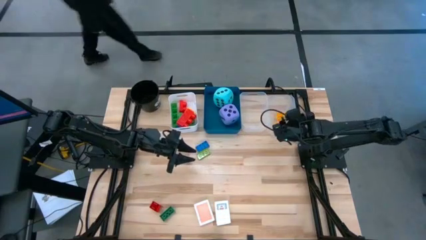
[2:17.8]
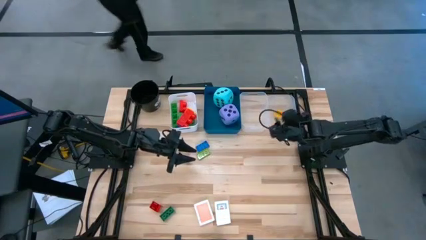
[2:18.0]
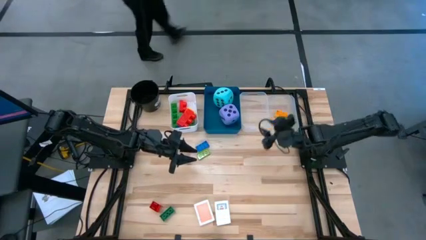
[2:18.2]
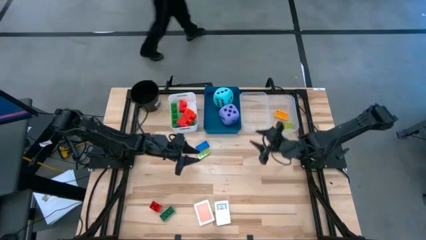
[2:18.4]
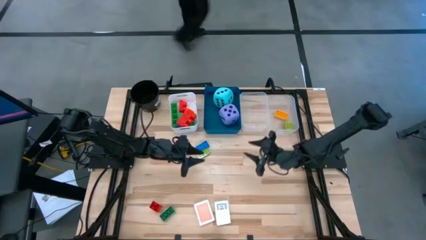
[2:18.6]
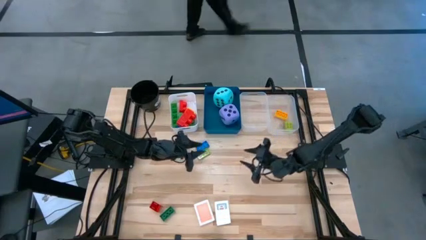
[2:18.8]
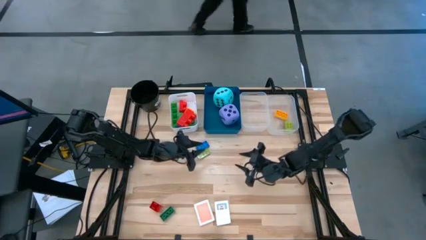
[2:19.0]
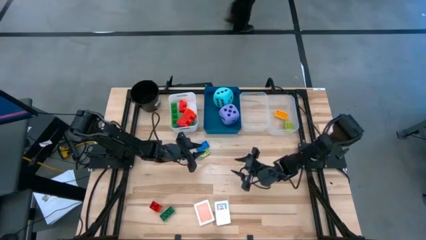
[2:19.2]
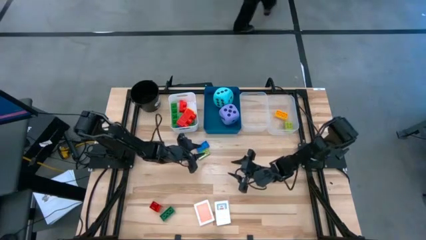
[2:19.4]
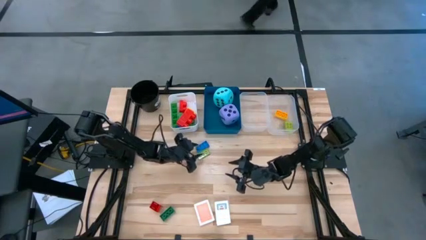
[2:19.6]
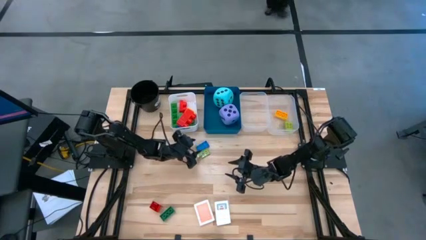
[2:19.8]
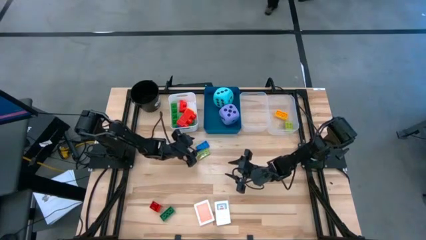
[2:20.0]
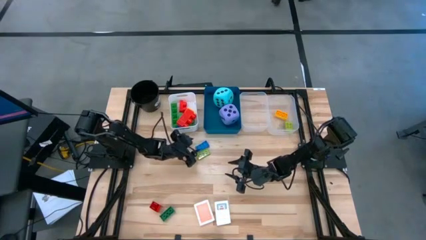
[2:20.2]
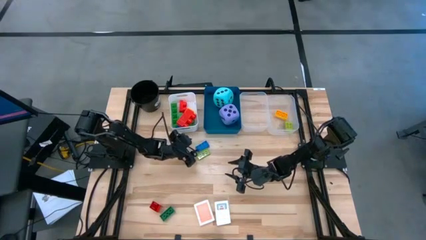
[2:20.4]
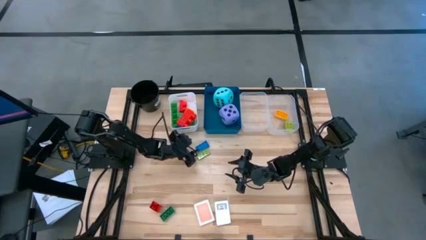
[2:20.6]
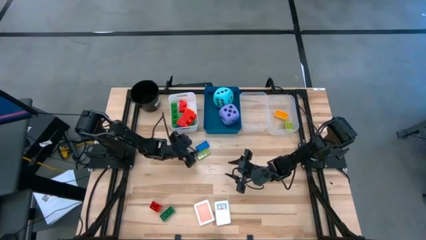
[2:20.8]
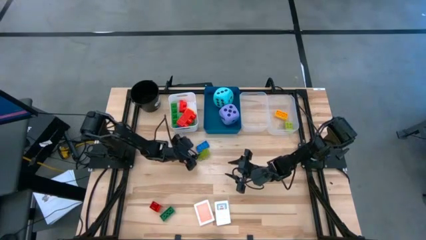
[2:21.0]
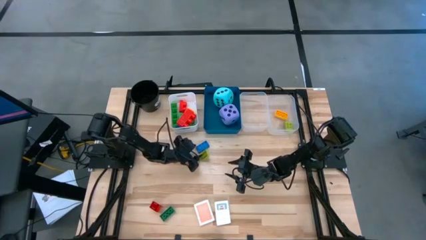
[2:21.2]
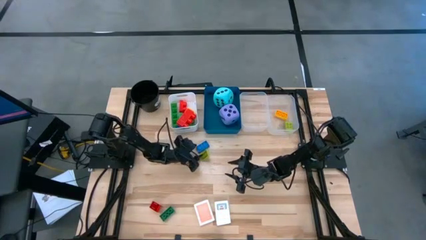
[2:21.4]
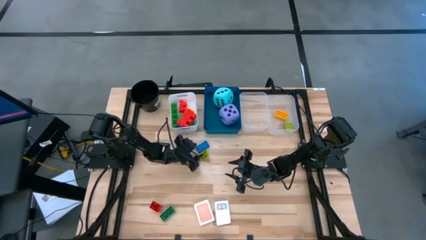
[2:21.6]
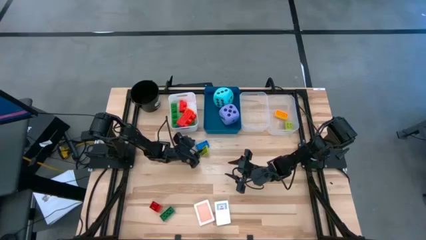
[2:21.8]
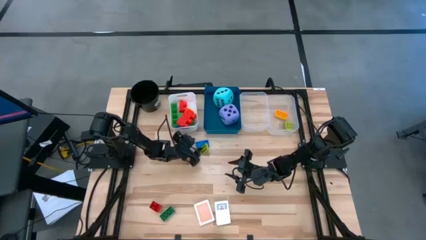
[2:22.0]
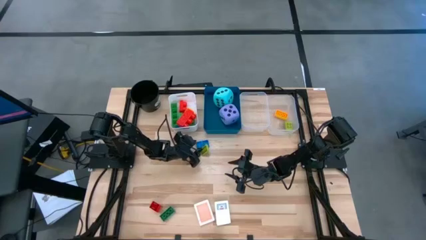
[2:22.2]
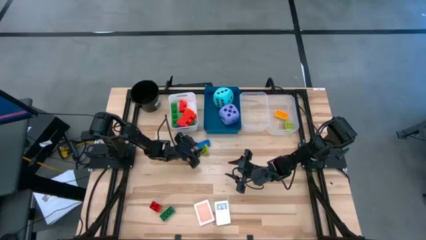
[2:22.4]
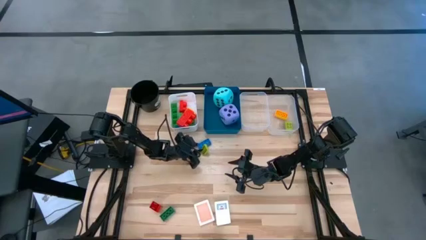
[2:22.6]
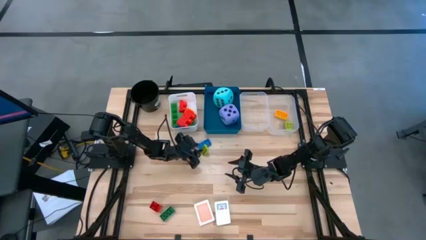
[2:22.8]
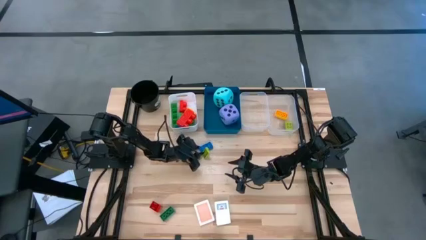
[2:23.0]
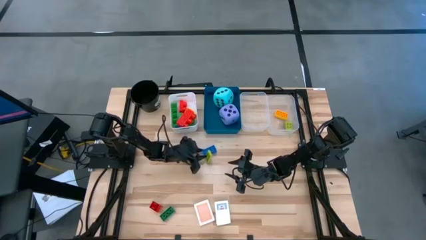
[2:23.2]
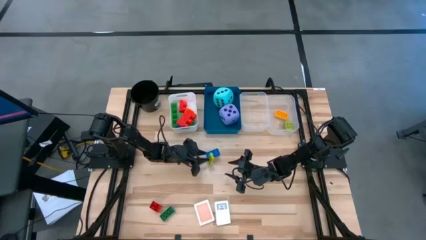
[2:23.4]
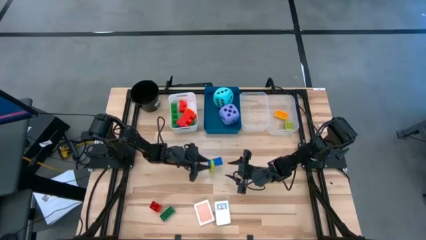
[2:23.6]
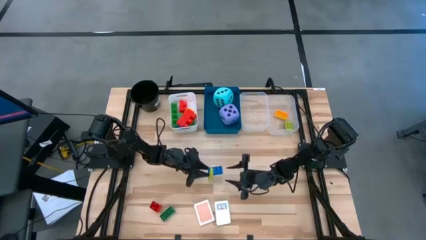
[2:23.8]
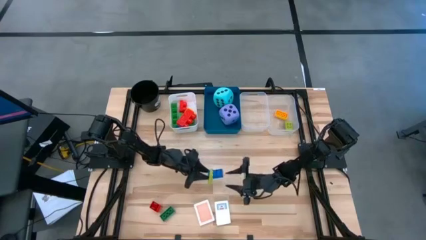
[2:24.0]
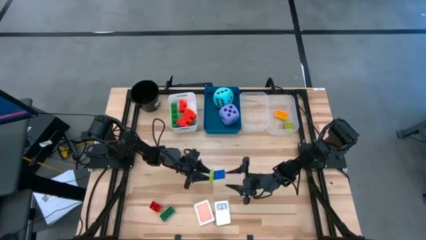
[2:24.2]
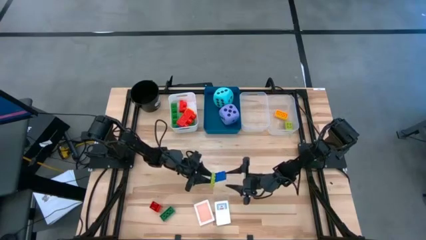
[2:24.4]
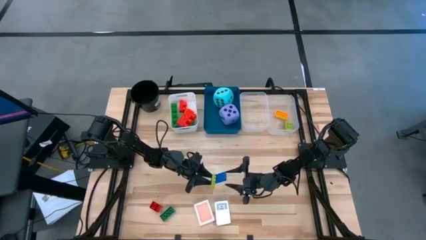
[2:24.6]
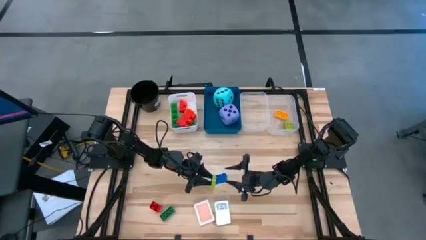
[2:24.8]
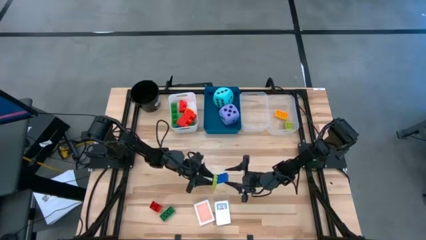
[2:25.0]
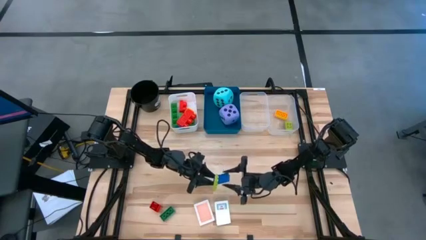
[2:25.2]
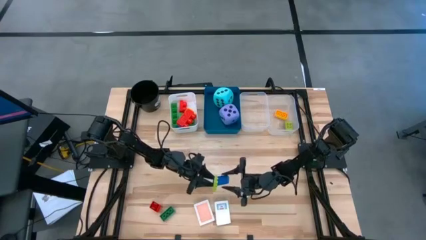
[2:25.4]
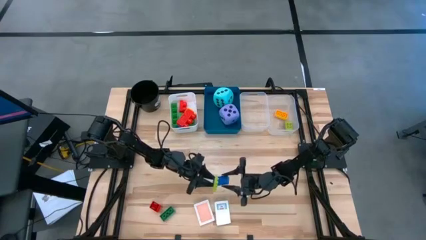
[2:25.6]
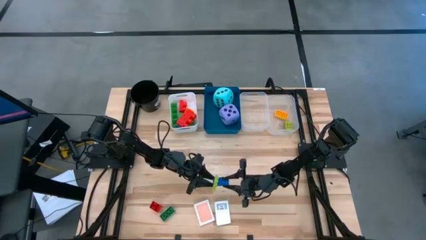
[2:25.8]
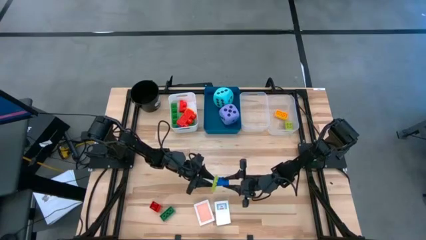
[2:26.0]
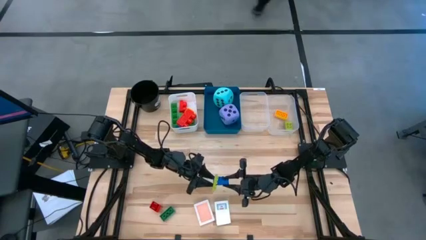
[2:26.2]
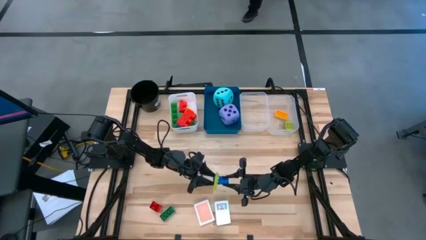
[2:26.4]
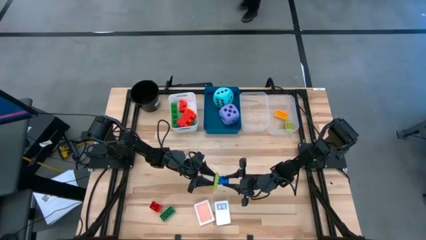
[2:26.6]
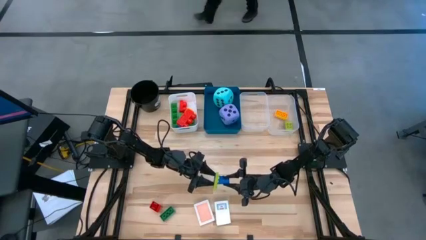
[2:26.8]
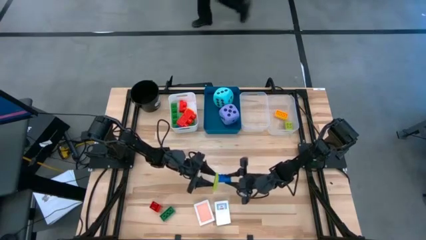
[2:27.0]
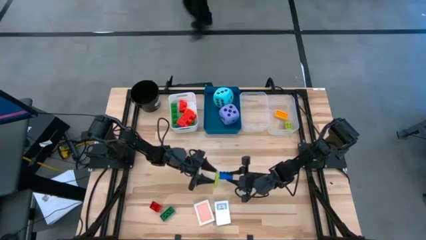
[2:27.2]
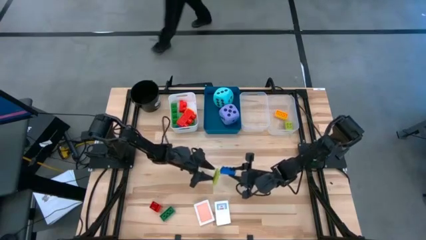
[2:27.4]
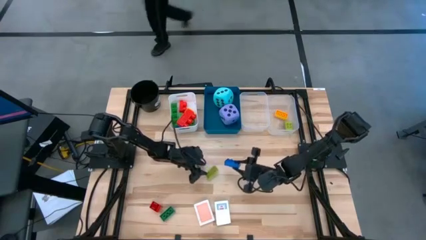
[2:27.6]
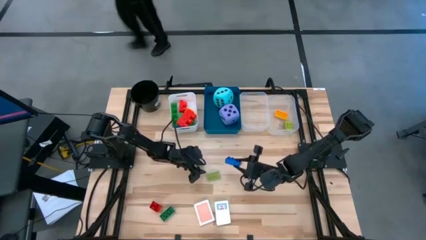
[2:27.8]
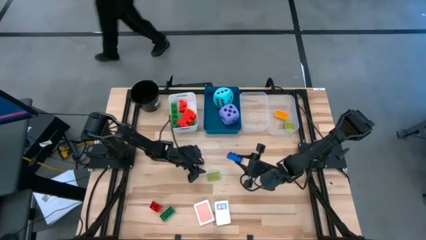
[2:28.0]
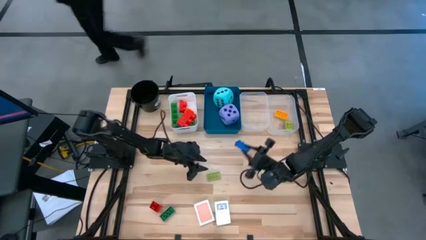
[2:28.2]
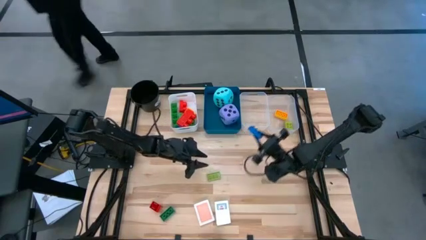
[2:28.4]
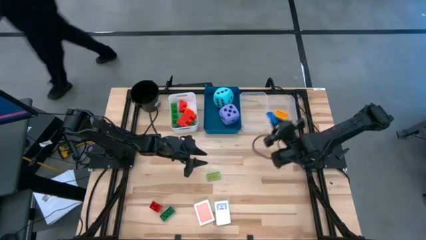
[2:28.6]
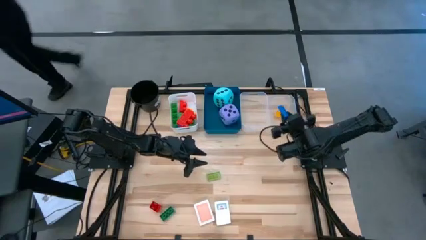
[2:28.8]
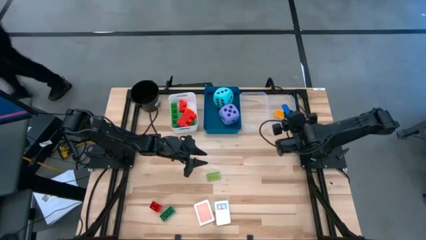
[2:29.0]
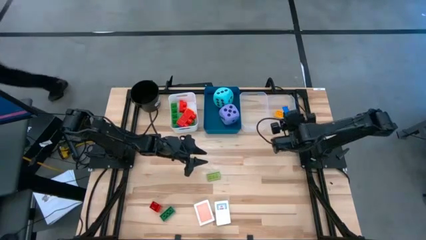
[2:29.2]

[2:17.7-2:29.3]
Task: Pick & Place Toys
Put the small blue game piece into the right transparent bin

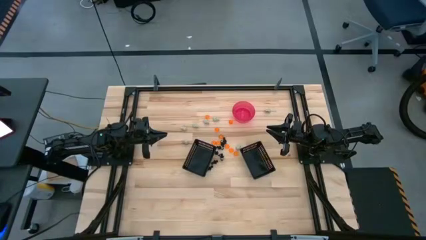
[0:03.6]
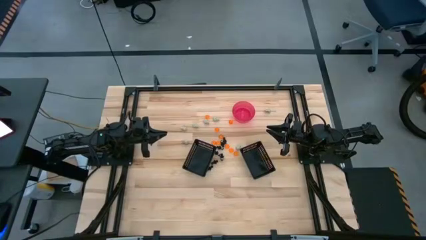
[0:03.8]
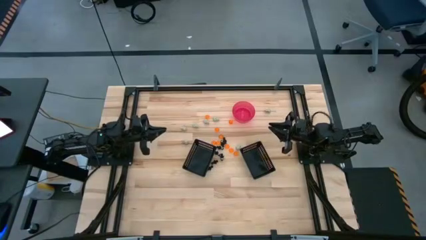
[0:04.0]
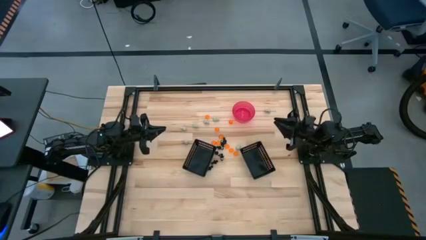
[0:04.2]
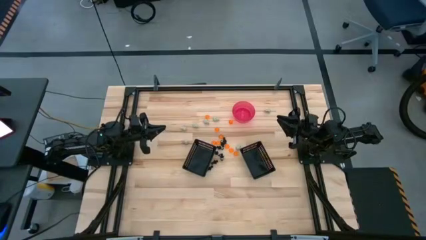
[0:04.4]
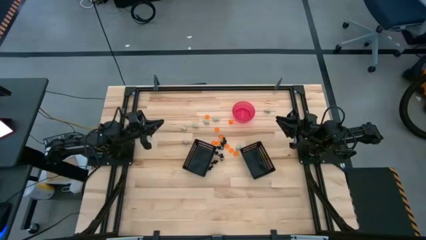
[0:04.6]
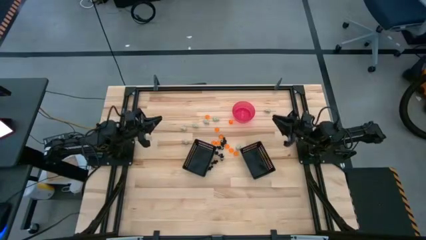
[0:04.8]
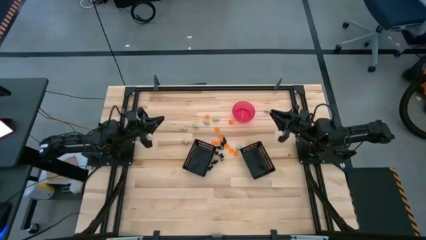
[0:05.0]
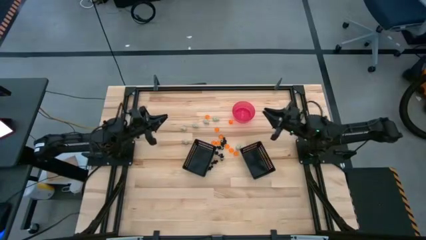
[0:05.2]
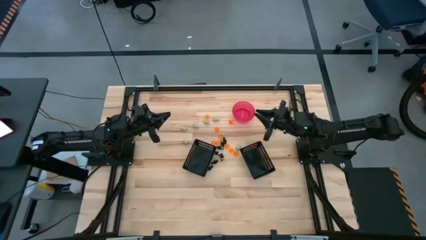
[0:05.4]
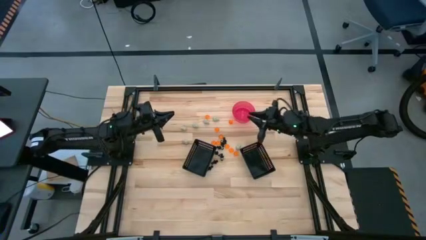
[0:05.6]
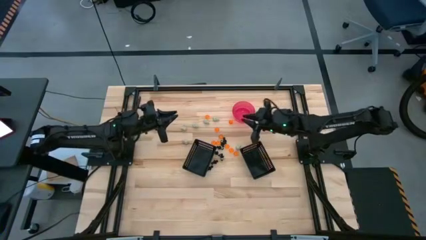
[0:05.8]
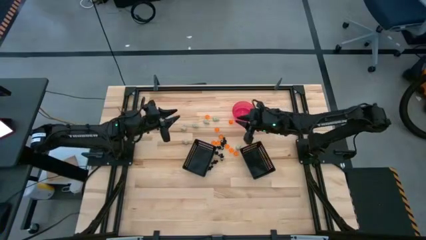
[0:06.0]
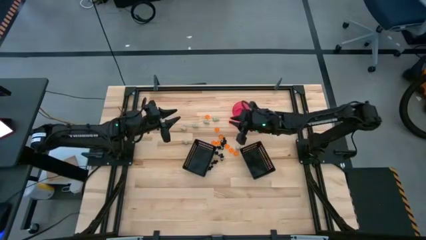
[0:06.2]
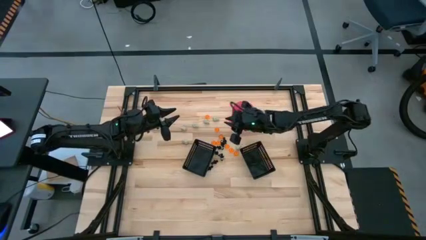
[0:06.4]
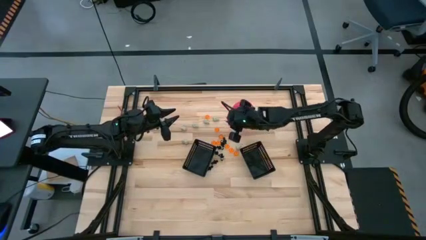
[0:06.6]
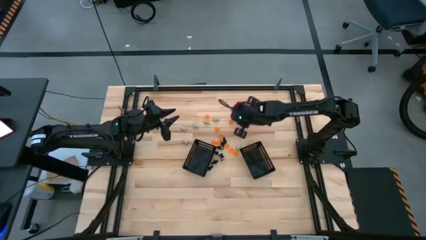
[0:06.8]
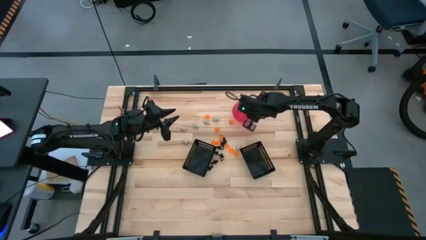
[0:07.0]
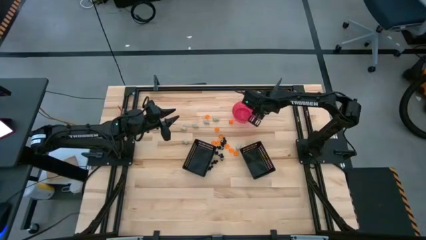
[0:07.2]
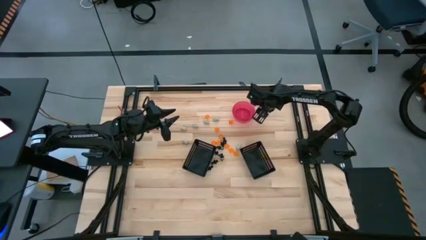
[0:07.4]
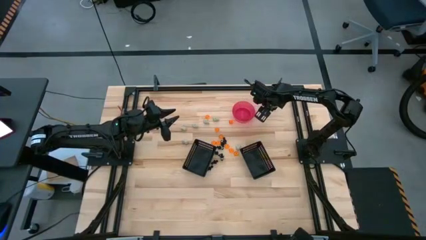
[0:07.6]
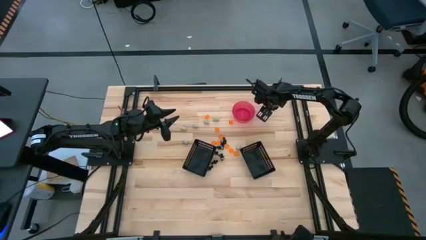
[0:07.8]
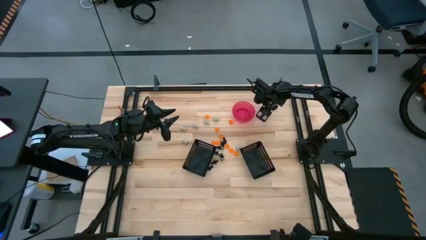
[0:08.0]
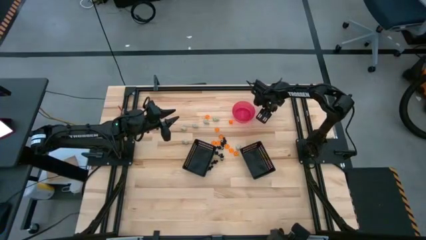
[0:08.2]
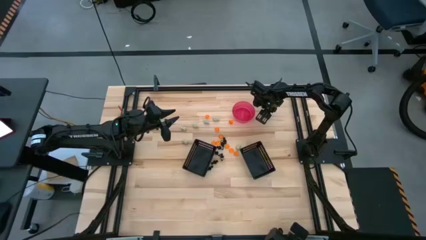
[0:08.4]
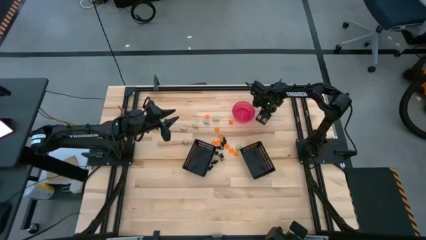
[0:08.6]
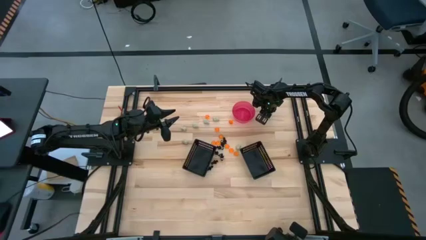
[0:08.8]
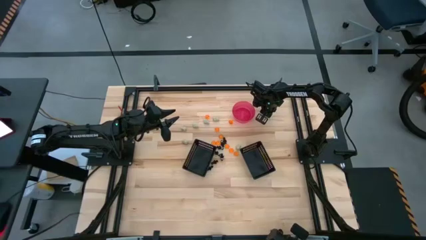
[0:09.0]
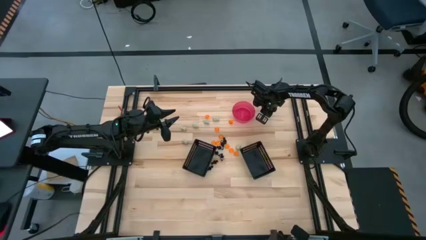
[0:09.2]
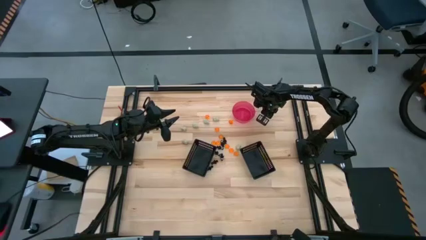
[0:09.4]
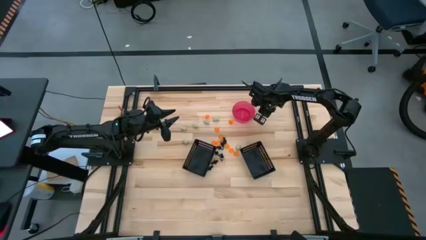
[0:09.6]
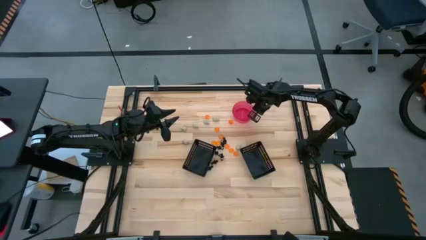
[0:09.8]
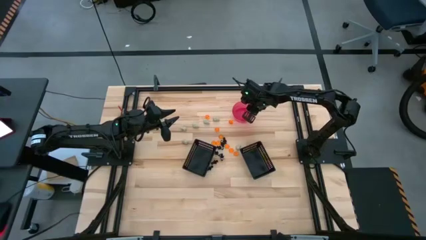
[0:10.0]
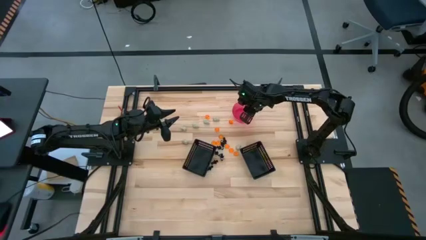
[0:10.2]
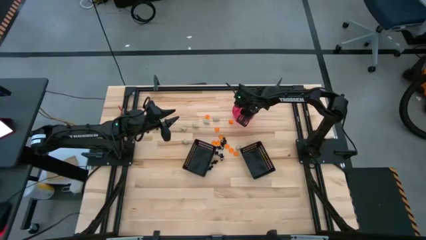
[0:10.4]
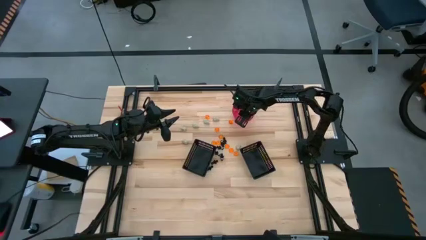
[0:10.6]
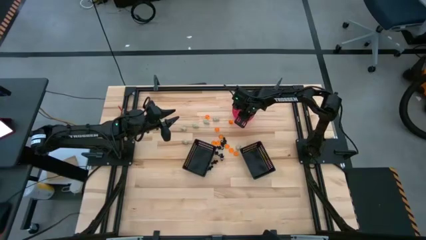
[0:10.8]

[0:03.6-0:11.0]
Task: Sort Halloween decoration
Put the white skull toy into the pink container
